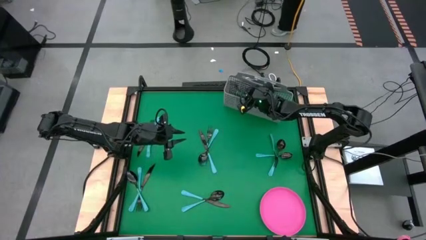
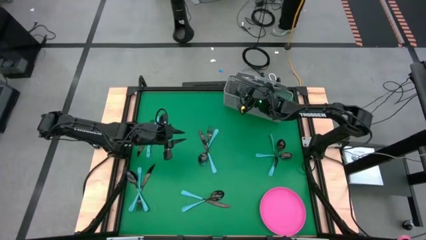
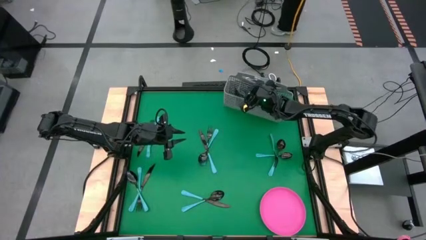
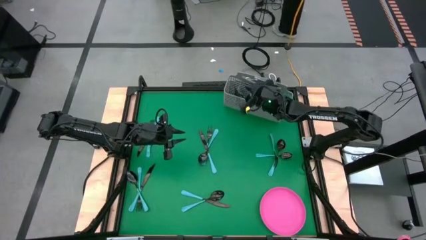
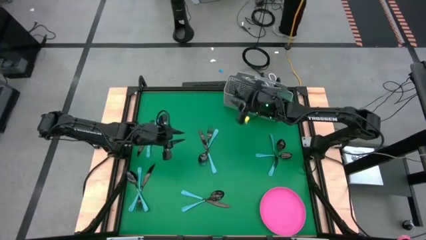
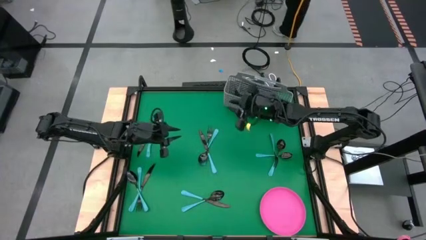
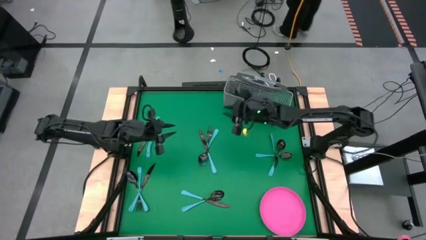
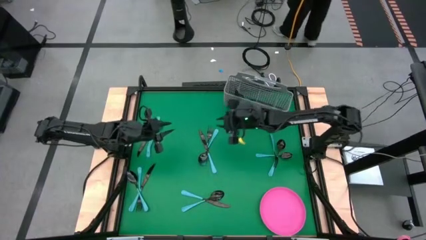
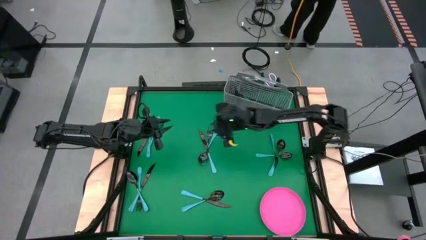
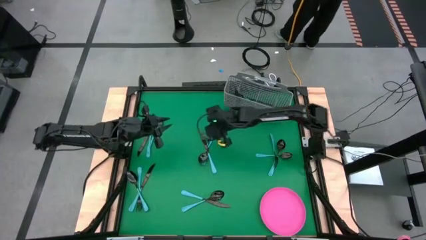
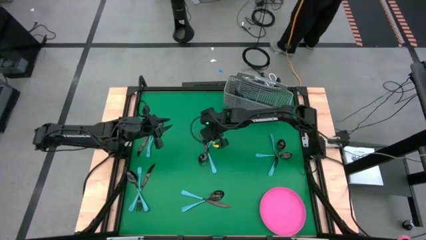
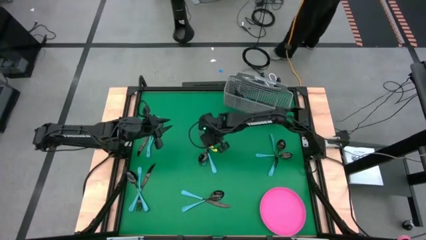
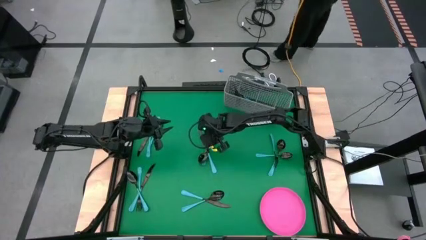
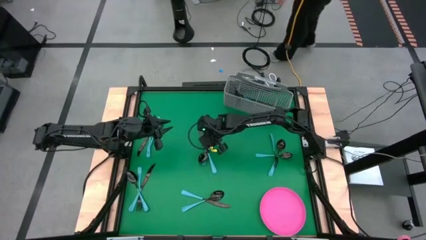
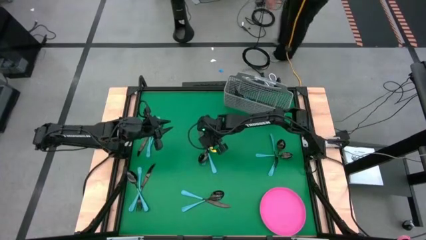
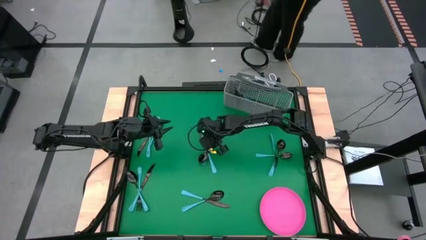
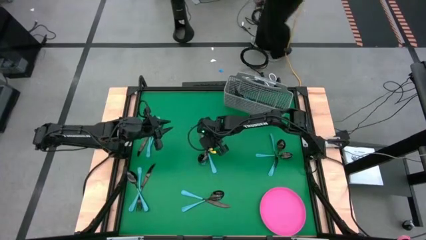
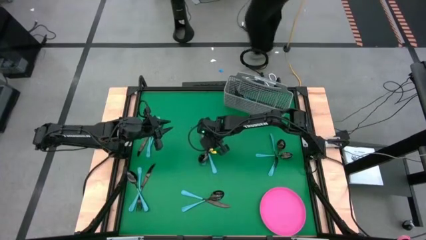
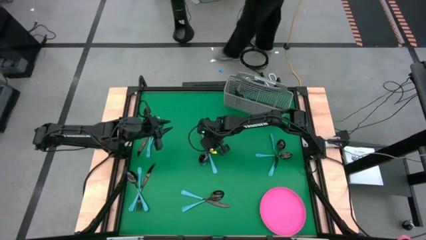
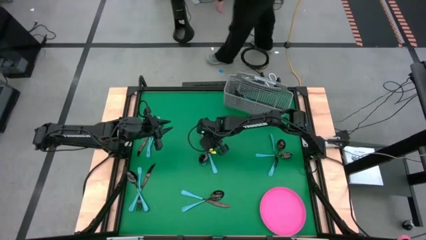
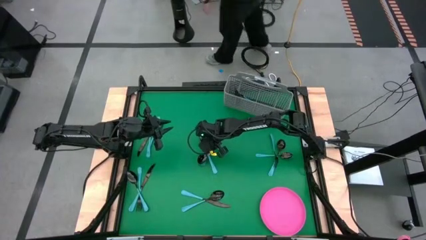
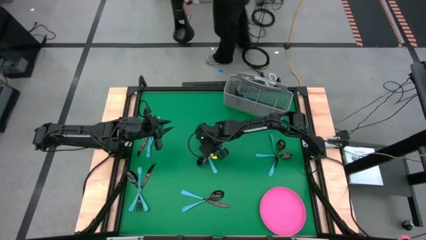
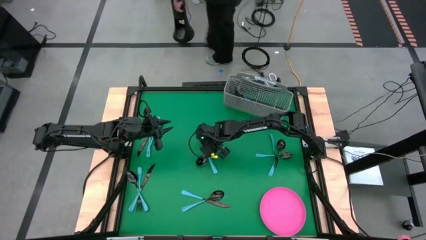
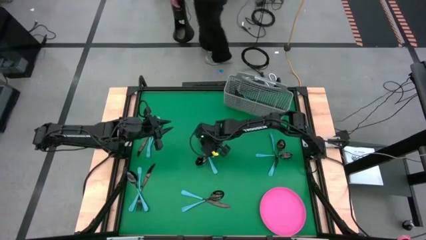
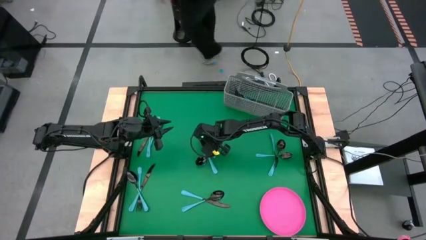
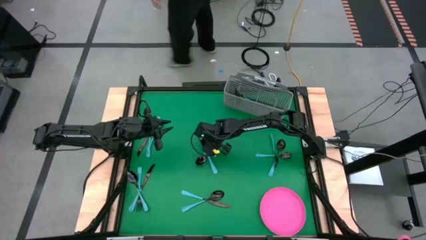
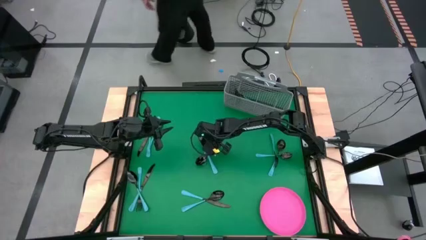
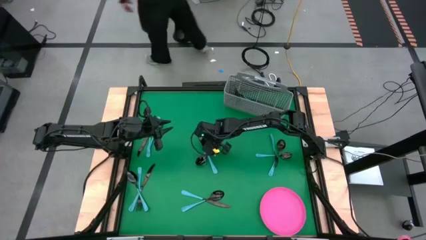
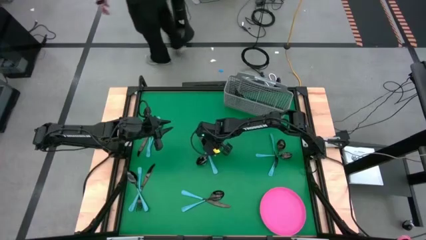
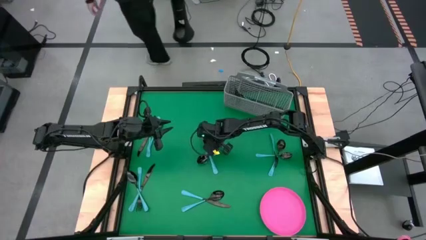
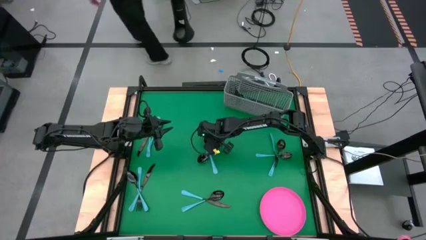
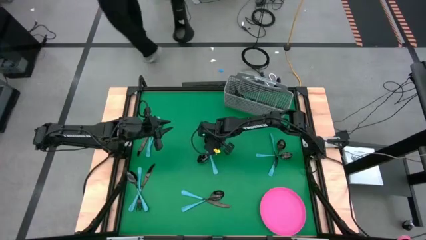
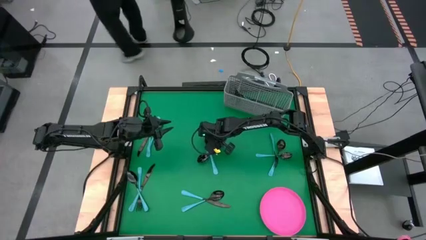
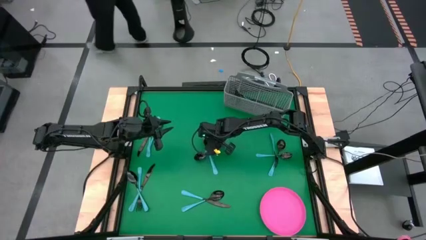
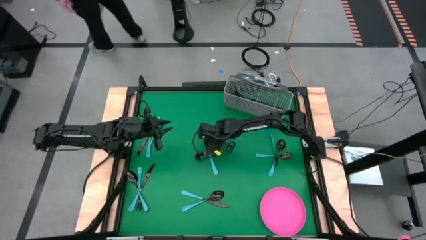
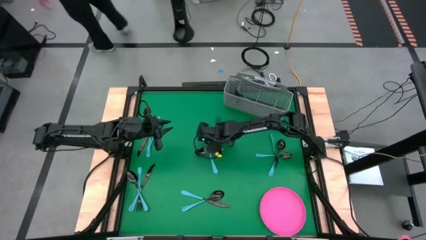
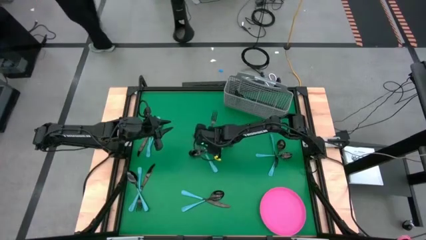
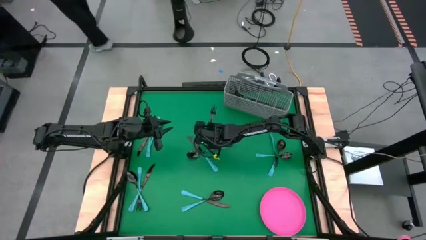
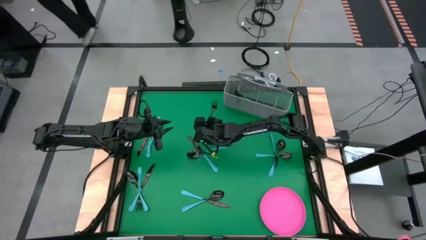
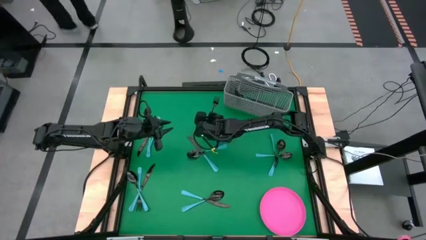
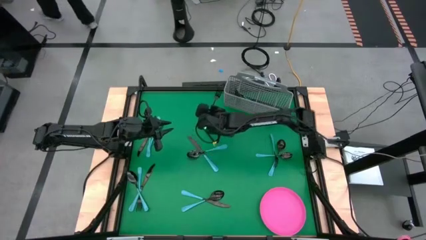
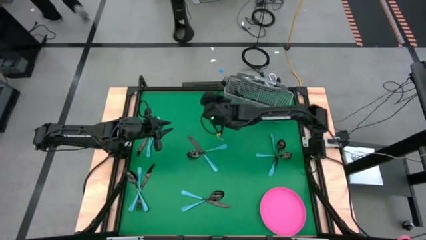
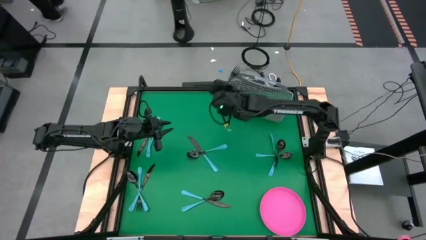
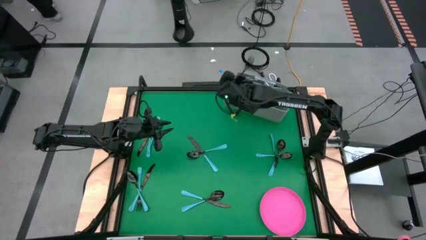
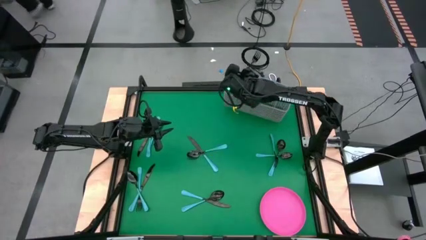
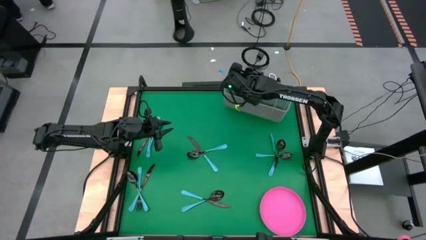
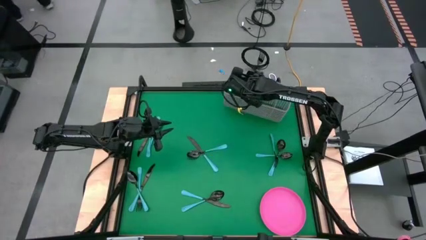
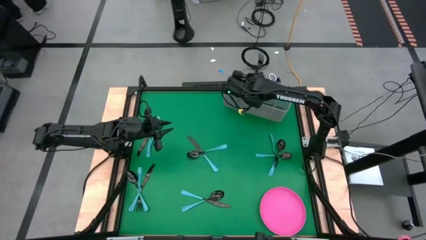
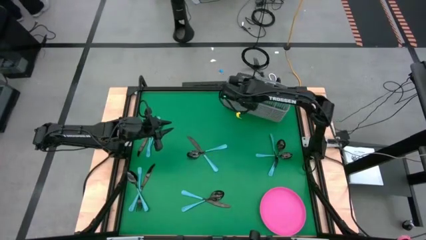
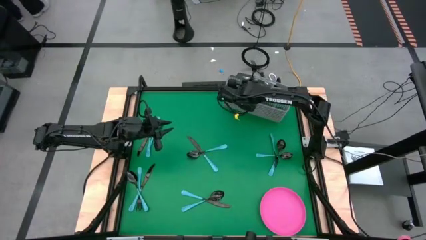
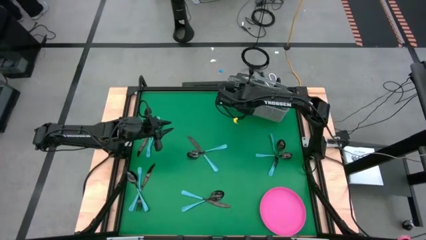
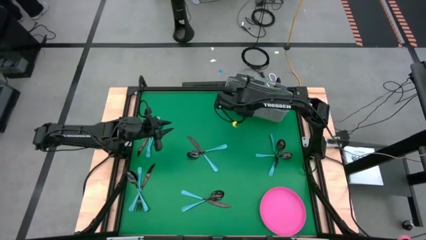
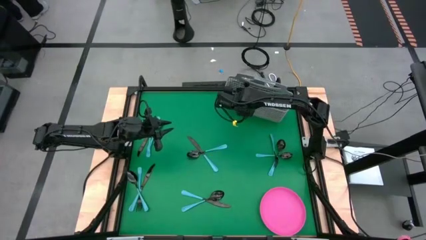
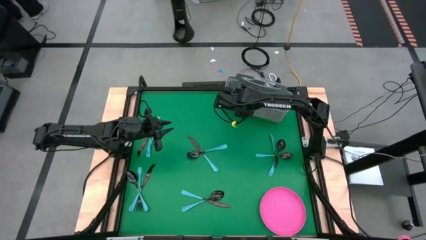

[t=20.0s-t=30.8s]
Task: Sort silverware
Put the blue fork into the silverware basket

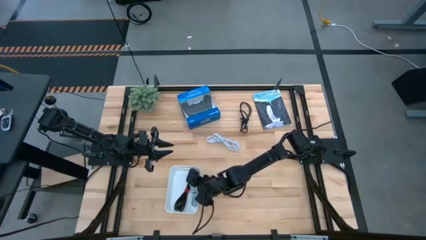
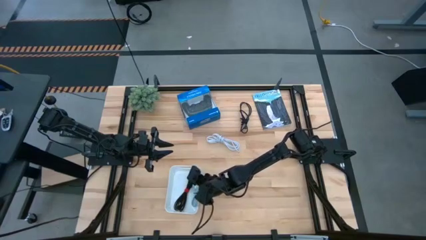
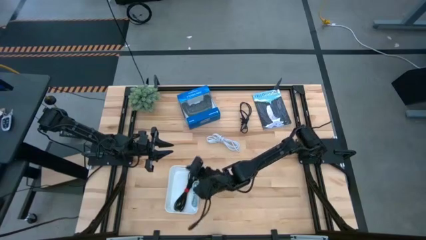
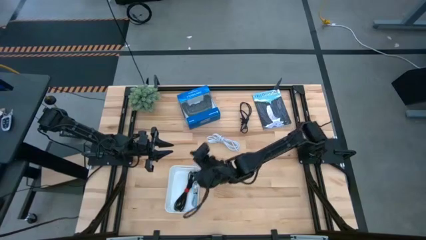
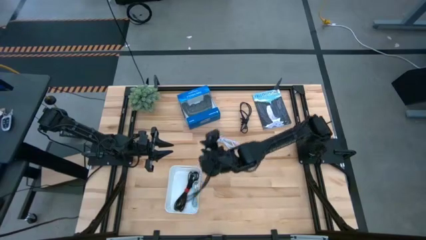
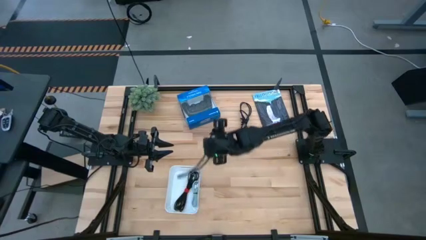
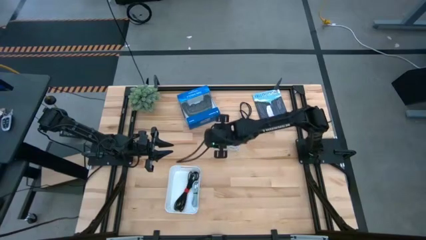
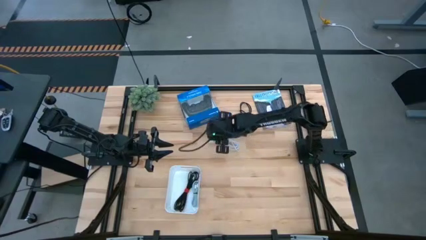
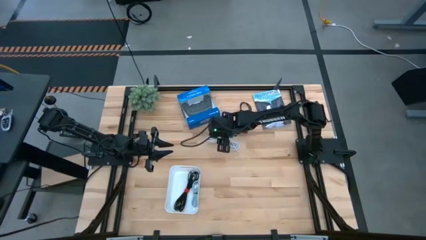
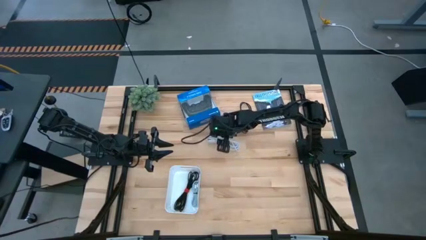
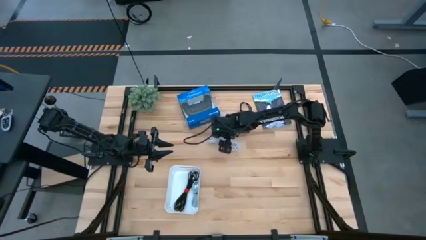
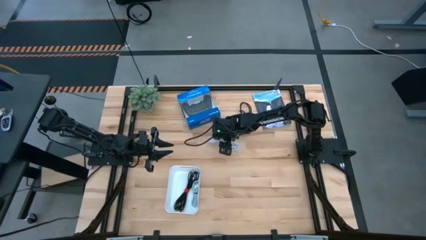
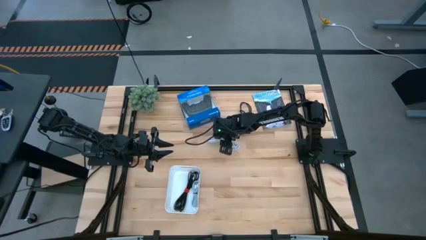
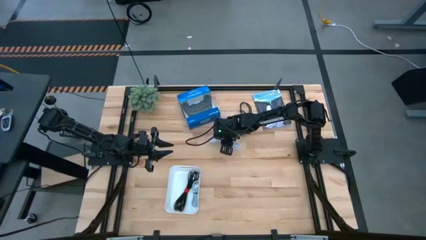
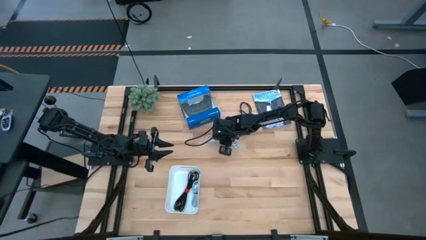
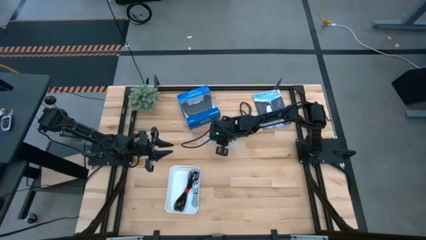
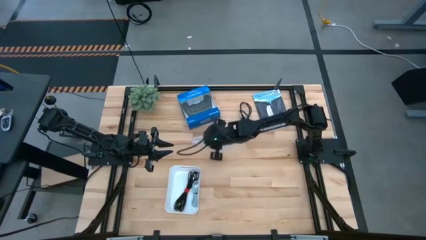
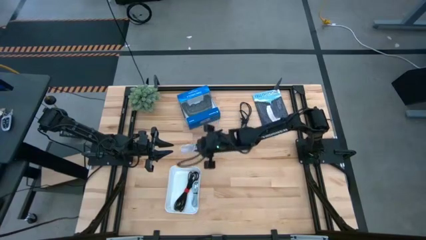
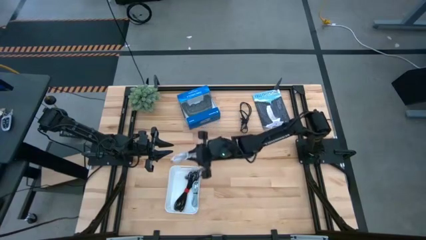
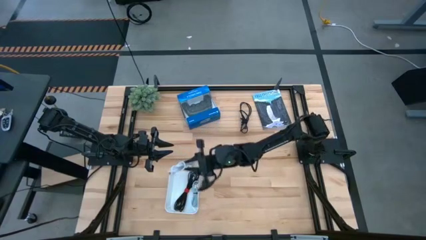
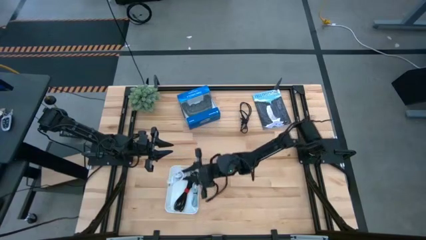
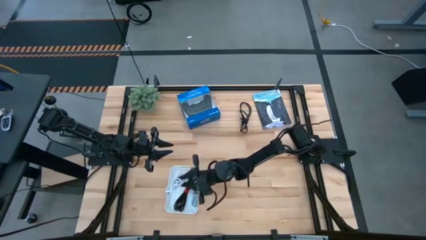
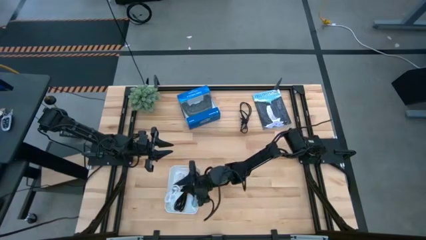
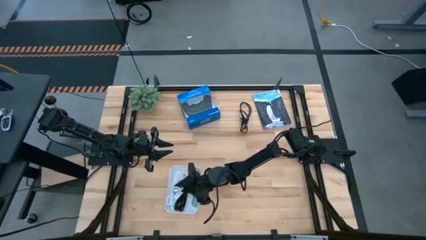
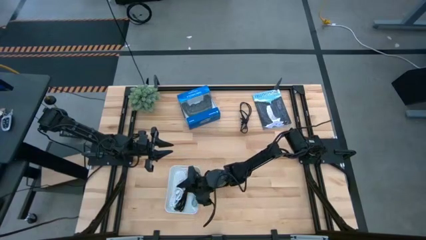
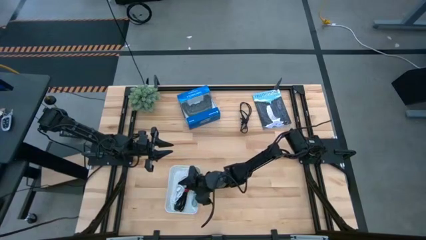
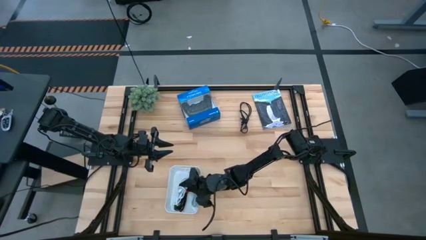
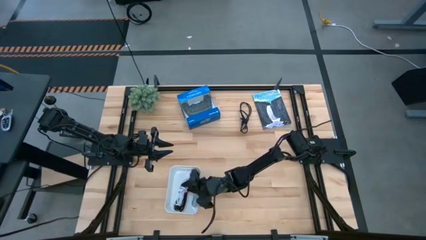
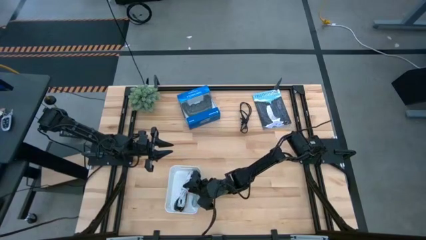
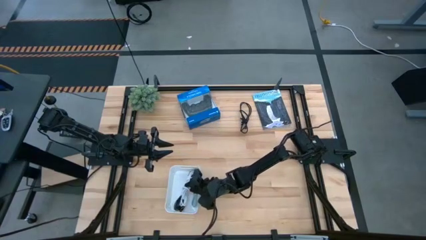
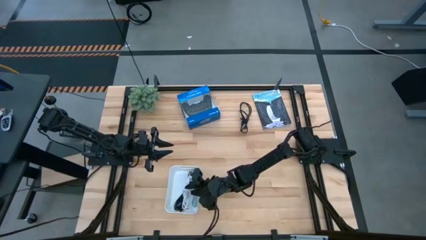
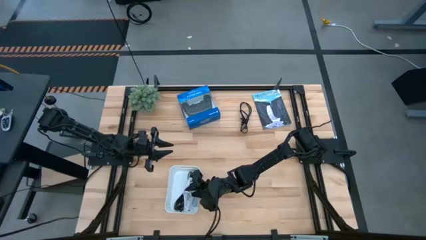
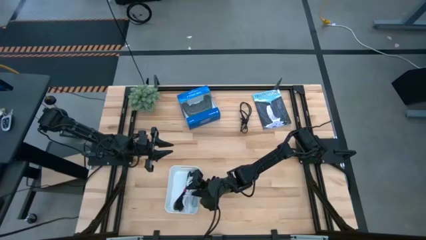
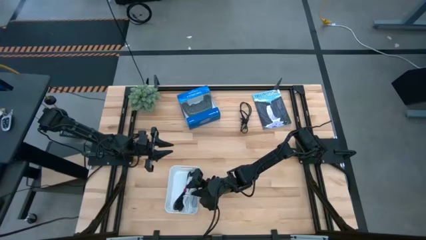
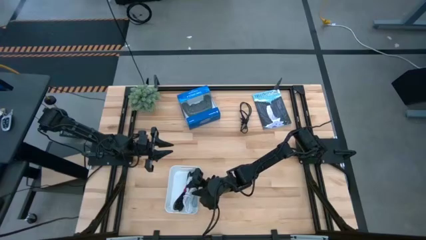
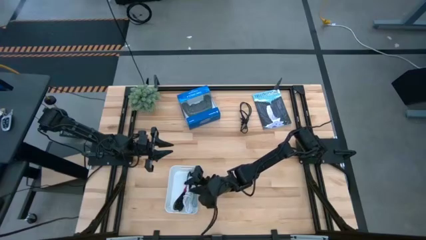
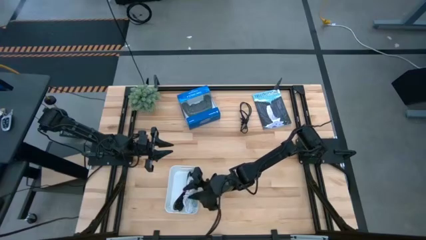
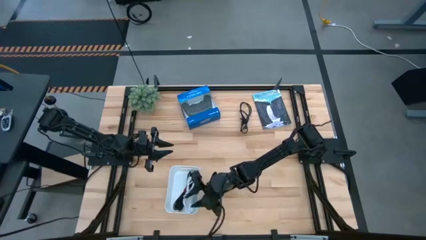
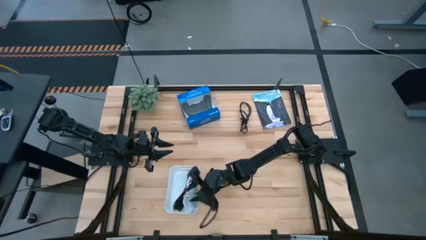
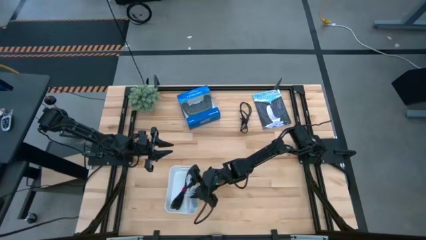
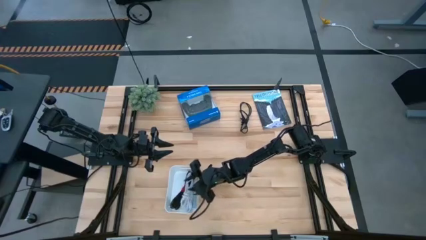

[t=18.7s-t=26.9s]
Task: Pick and place USB-C Cables
Put the white charger cable into the white bin
